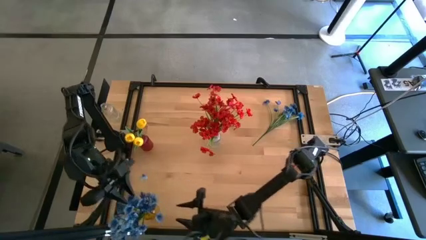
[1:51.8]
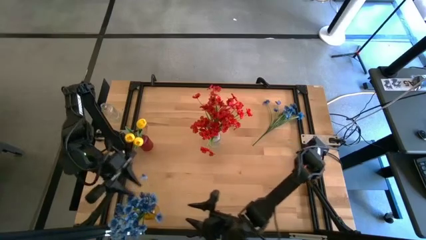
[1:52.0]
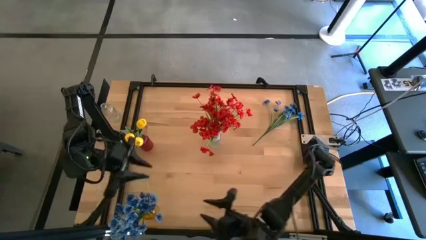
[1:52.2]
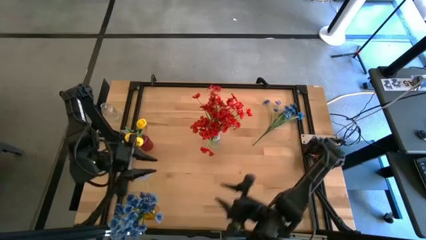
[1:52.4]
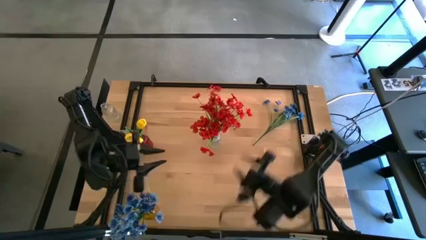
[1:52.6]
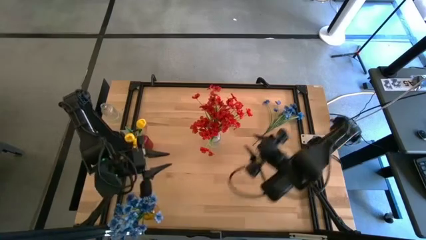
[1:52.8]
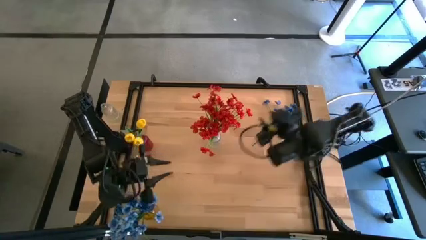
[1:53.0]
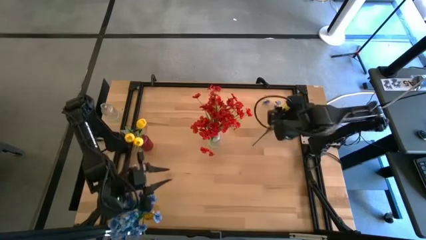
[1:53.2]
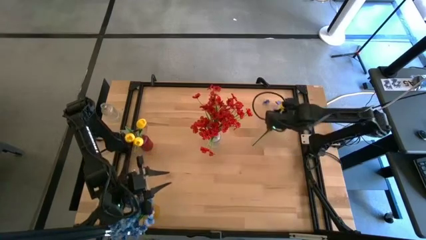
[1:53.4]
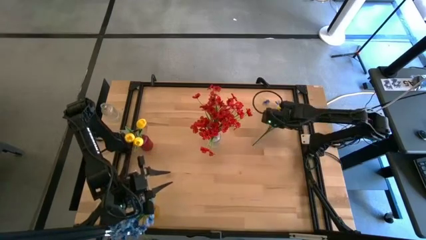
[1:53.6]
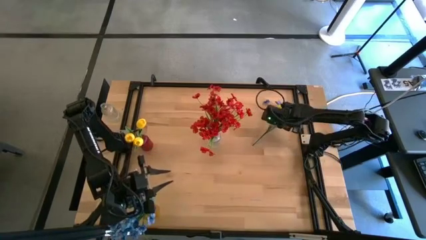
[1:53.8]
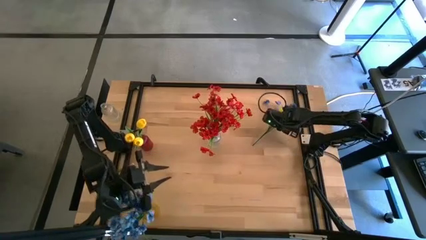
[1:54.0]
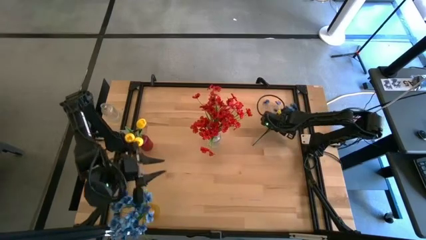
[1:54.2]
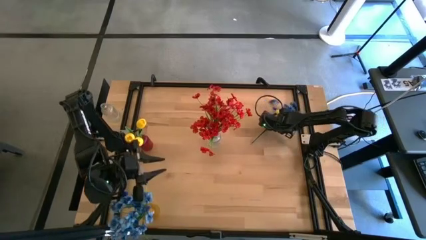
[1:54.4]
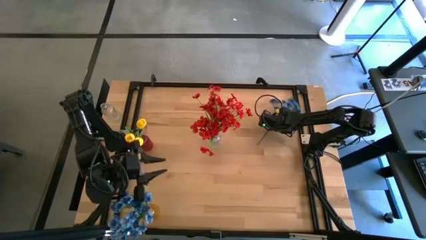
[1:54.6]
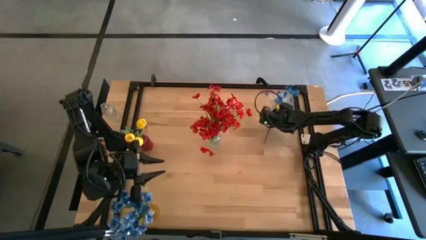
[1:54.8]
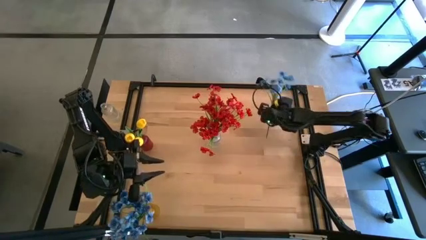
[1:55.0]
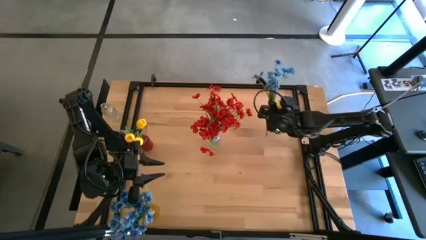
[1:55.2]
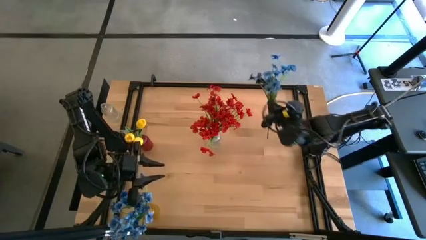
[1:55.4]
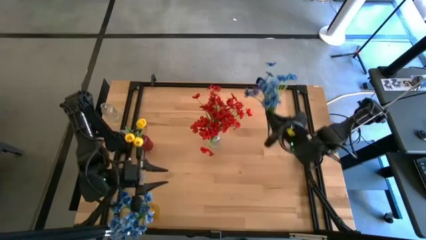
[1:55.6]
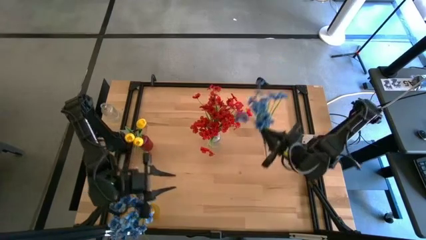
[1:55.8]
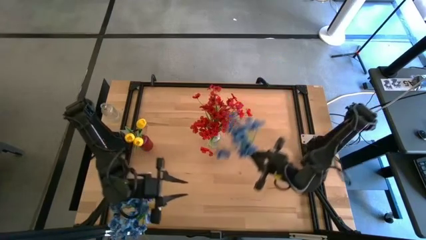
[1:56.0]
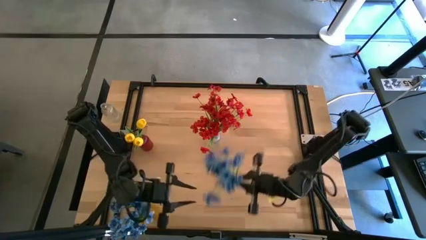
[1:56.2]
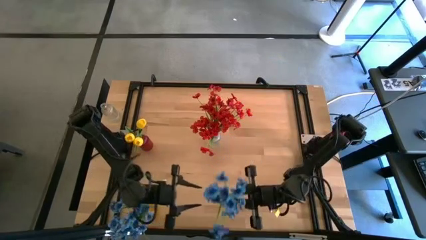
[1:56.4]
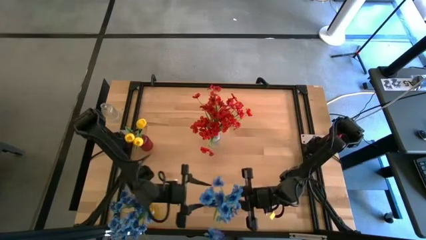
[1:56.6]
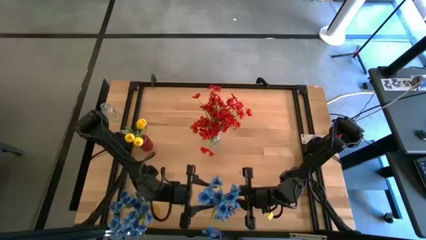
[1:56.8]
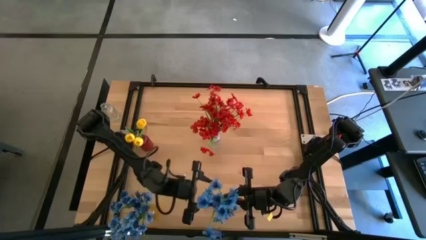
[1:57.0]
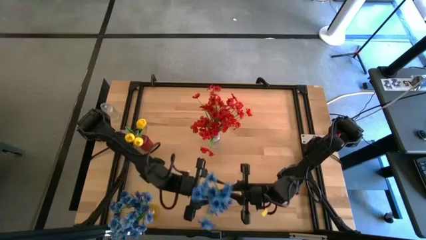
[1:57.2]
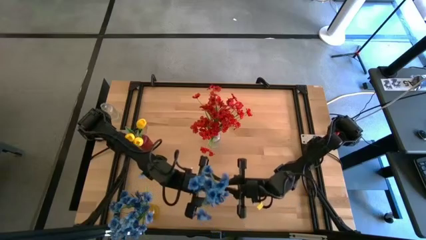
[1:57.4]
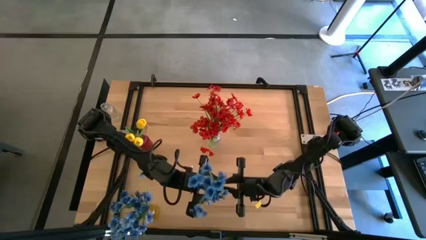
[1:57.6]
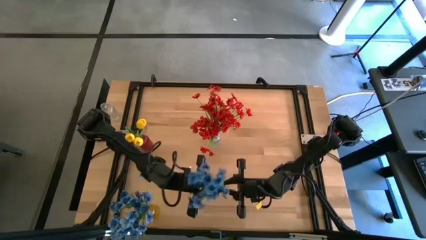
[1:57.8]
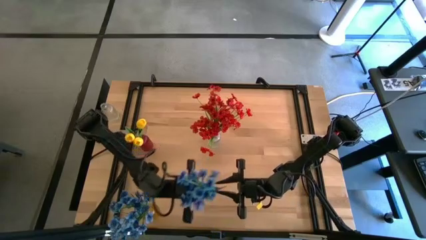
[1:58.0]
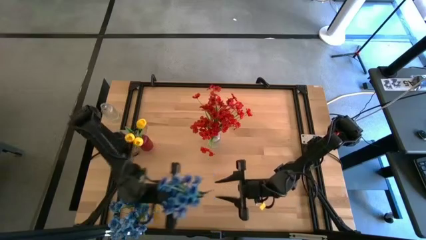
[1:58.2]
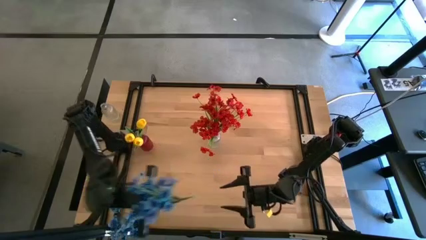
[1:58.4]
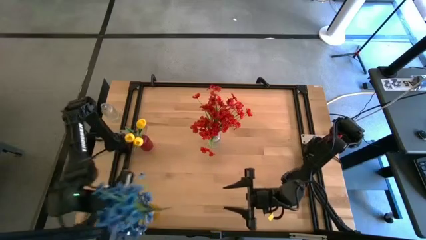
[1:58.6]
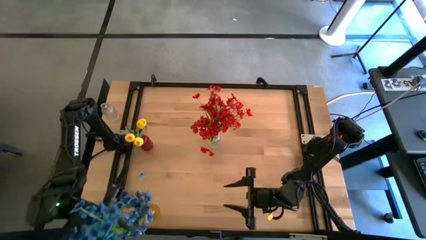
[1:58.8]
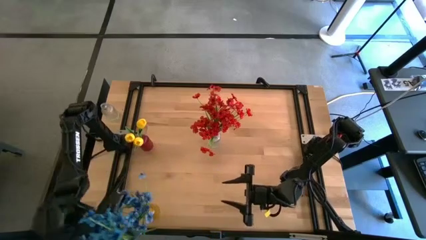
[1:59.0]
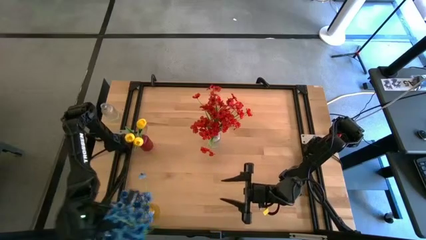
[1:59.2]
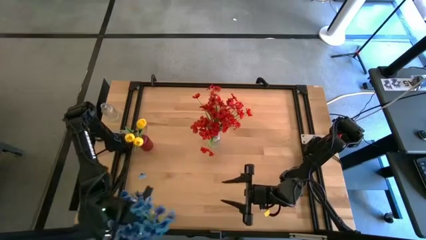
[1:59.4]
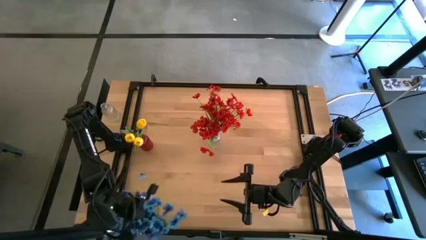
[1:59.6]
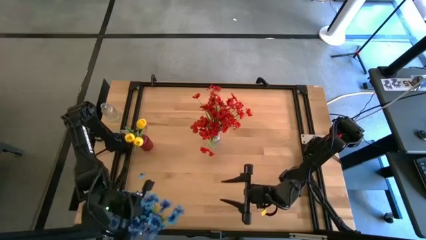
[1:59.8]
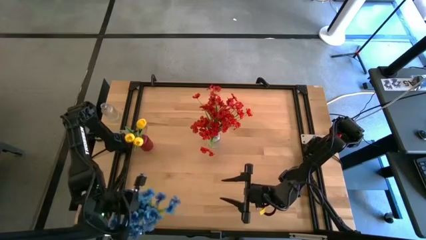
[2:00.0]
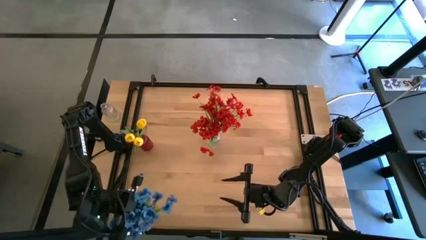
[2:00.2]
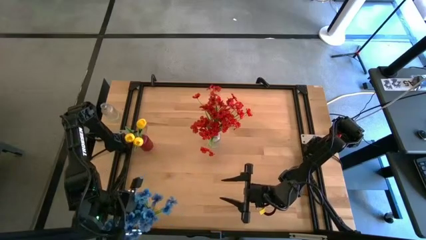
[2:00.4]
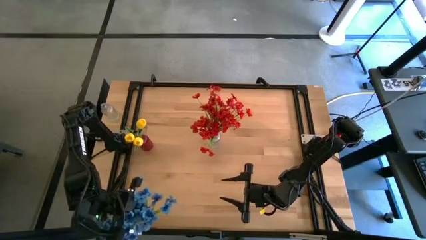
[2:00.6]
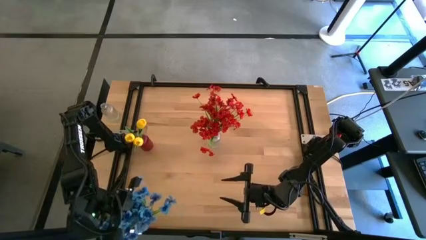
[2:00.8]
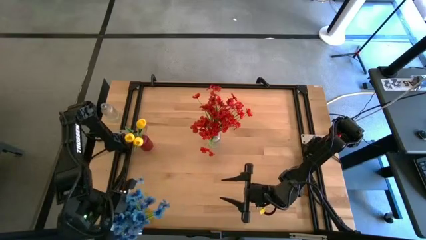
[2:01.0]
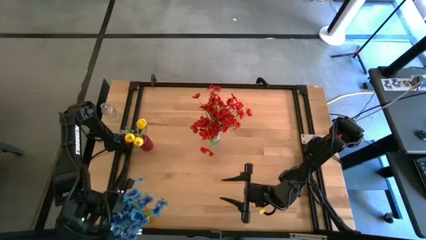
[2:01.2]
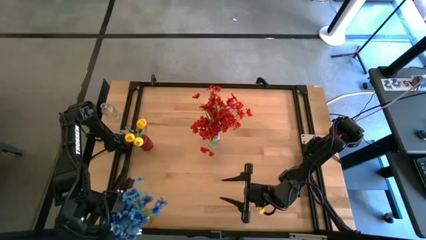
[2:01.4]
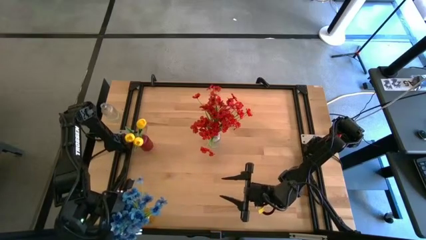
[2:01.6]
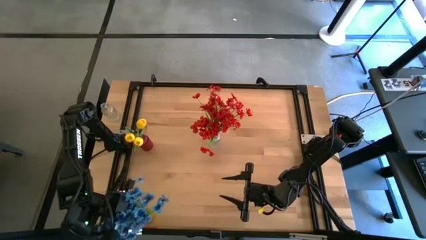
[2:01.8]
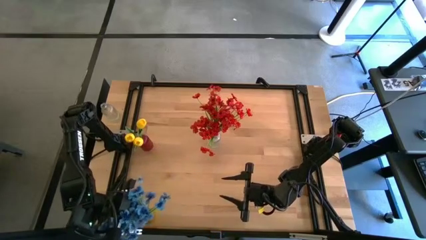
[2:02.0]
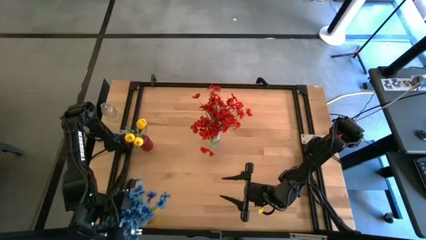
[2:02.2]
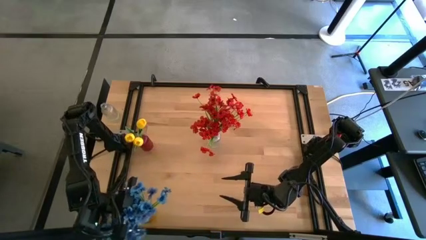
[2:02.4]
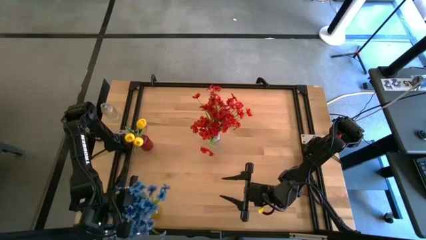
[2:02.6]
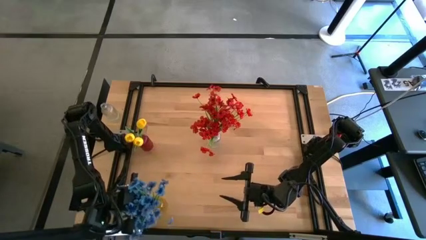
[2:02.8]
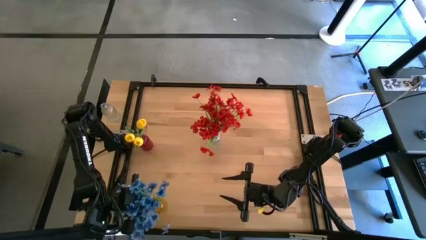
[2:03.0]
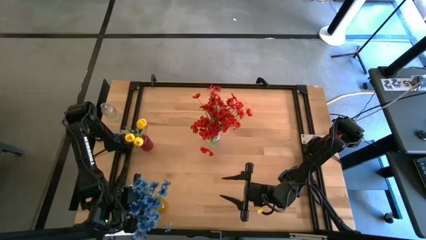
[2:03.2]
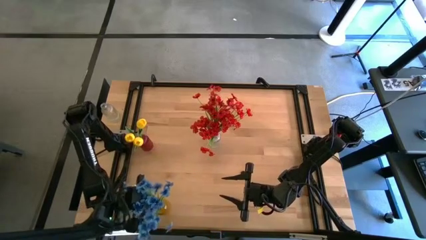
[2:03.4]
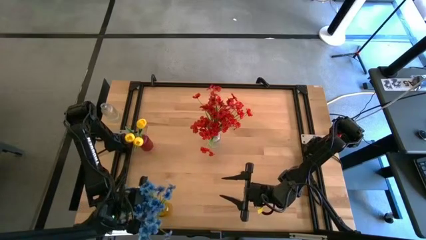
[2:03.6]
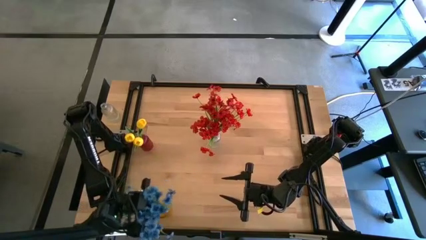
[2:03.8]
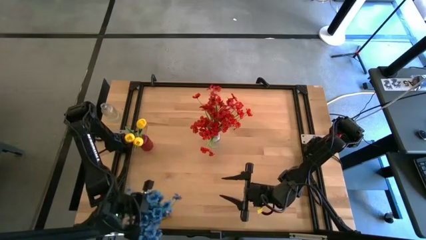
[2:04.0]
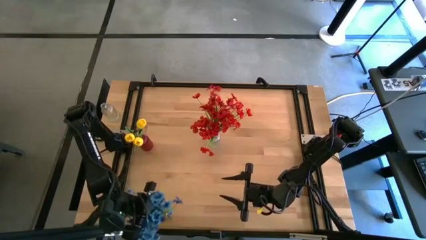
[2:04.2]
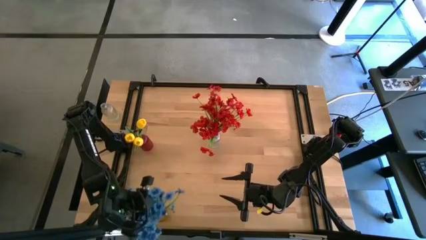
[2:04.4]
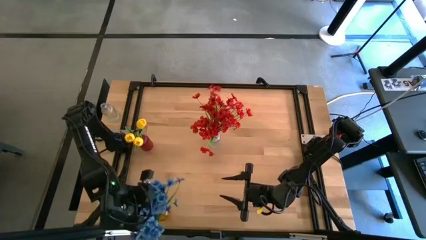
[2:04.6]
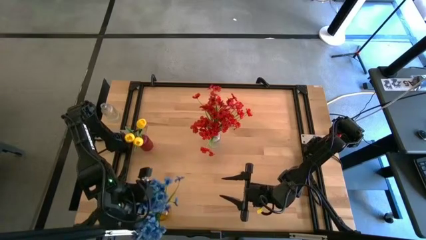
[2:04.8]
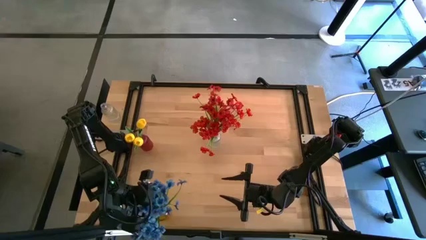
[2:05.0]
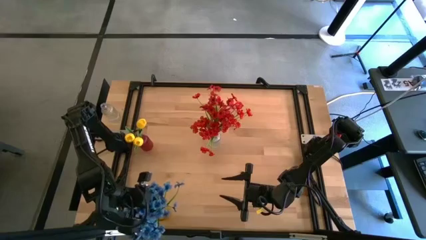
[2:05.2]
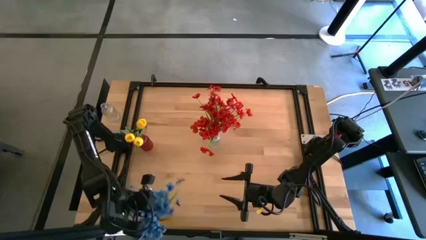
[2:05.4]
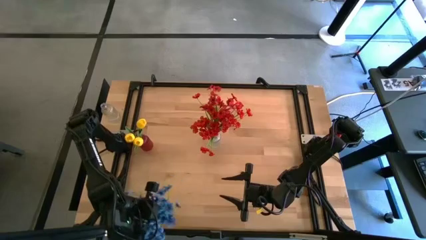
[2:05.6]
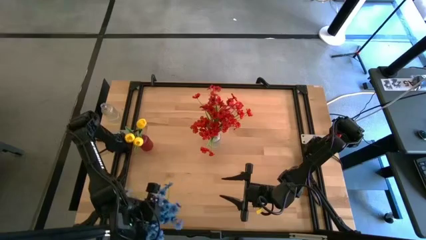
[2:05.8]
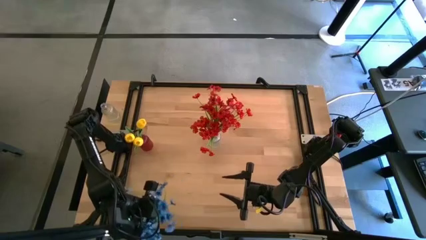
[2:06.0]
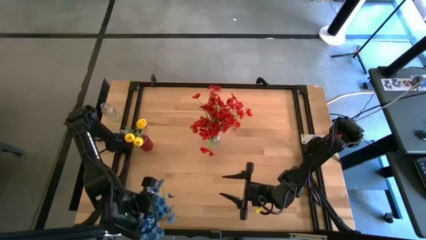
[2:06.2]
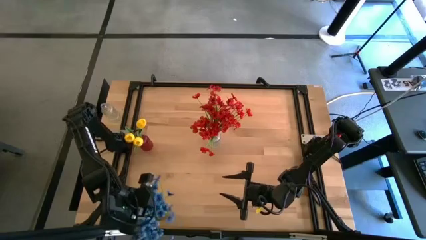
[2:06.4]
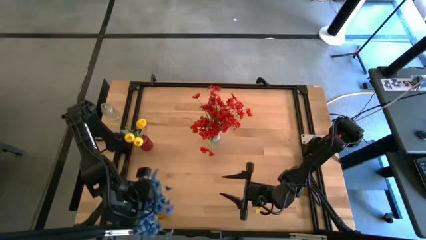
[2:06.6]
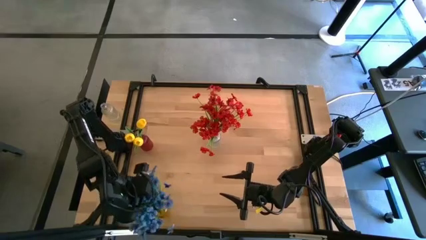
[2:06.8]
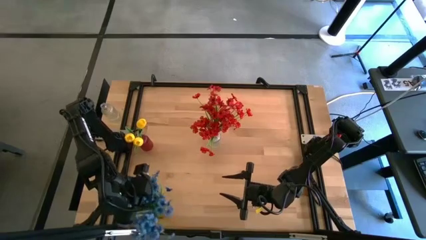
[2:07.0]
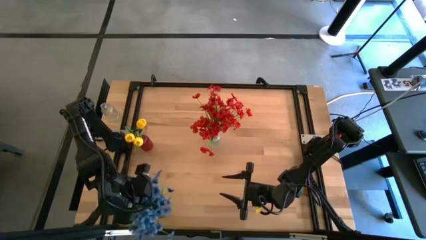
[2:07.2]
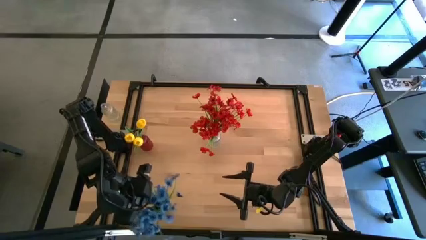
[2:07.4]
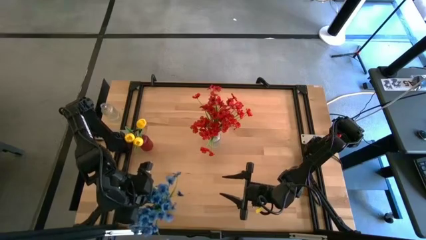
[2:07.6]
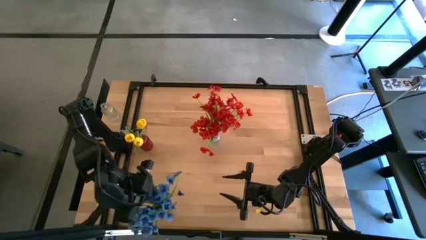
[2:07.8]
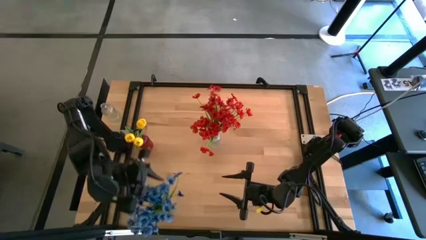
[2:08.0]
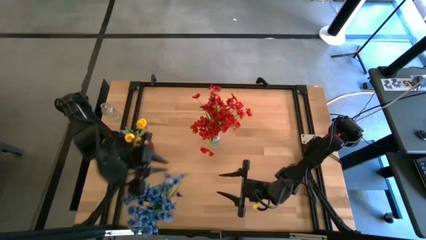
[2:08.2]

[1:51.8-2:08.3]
Task: Sort flowers into vase by color
Put the blue flower into the yellow vase
